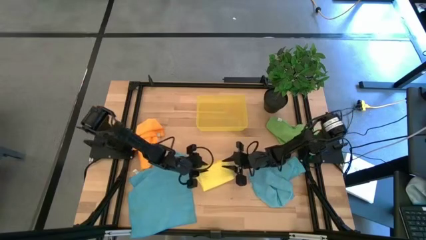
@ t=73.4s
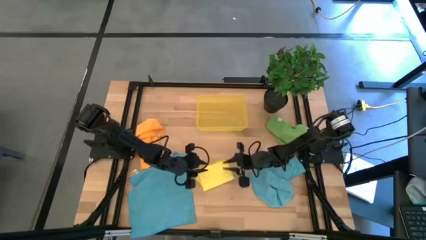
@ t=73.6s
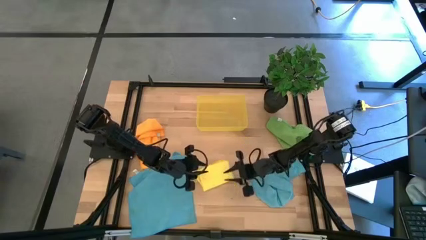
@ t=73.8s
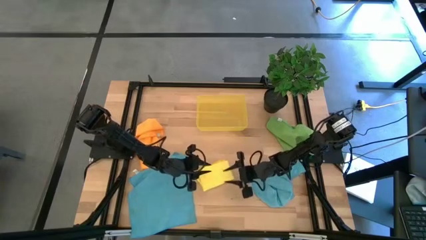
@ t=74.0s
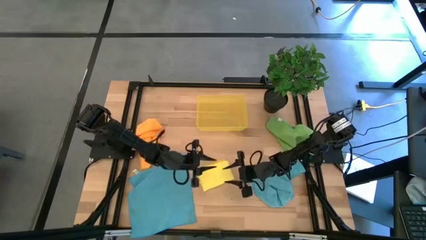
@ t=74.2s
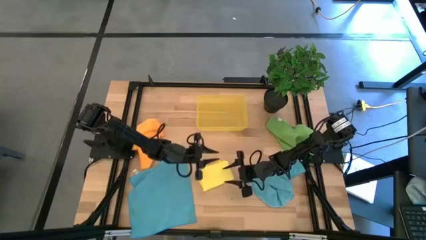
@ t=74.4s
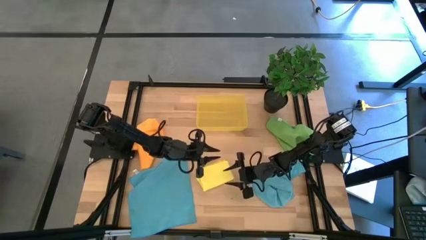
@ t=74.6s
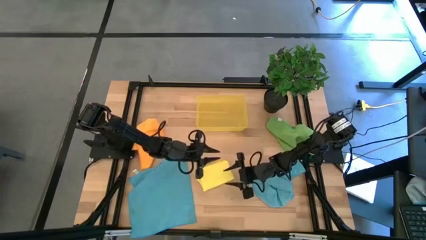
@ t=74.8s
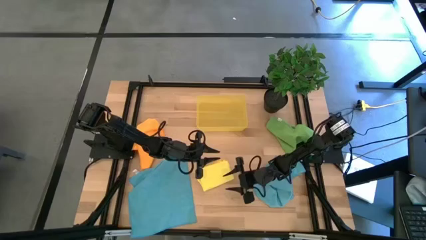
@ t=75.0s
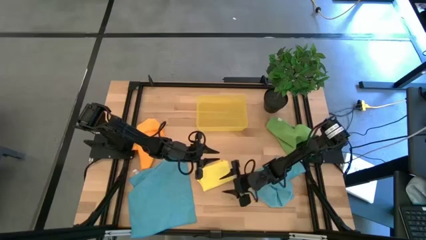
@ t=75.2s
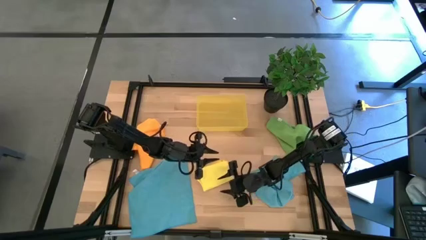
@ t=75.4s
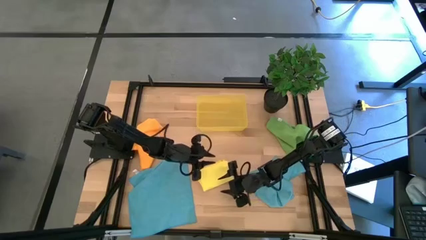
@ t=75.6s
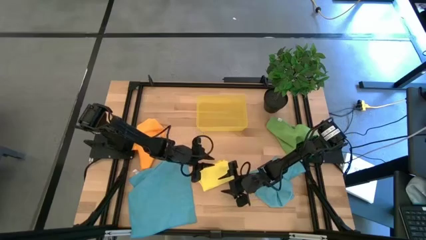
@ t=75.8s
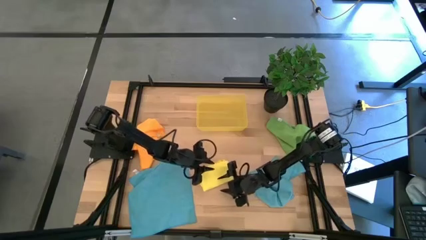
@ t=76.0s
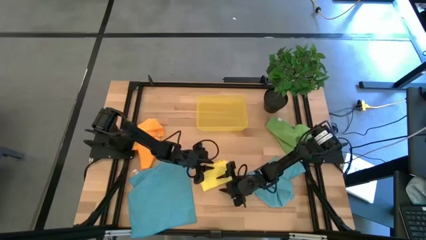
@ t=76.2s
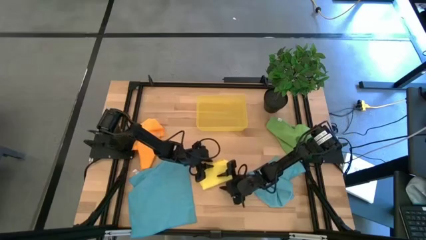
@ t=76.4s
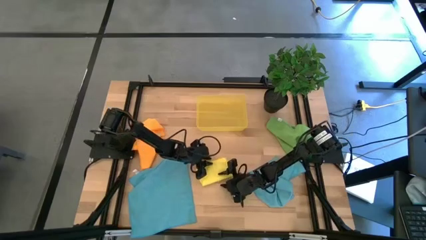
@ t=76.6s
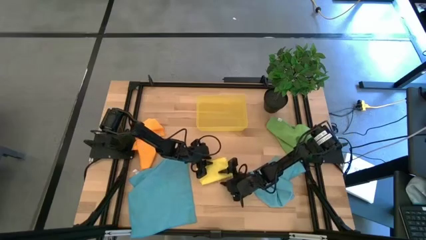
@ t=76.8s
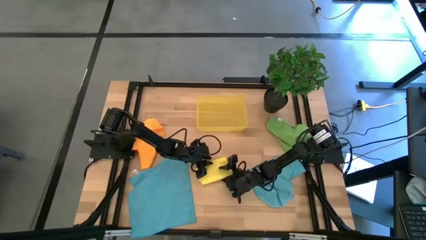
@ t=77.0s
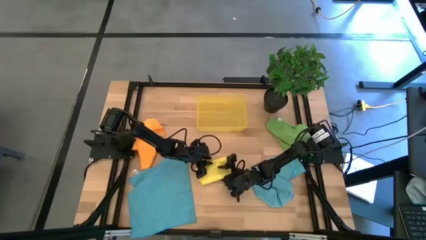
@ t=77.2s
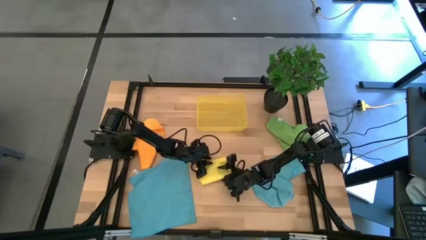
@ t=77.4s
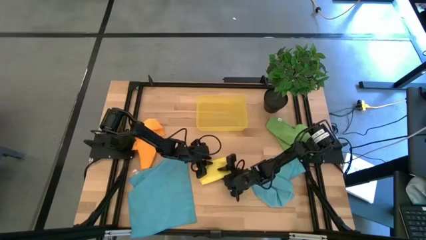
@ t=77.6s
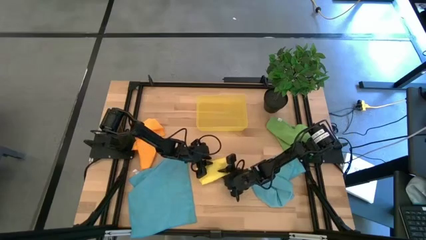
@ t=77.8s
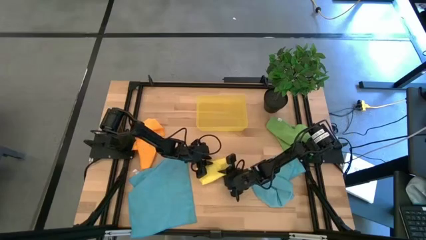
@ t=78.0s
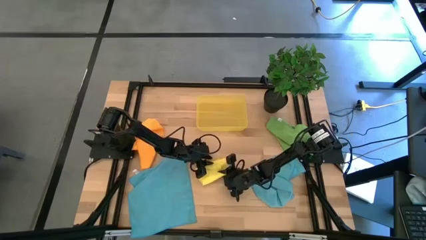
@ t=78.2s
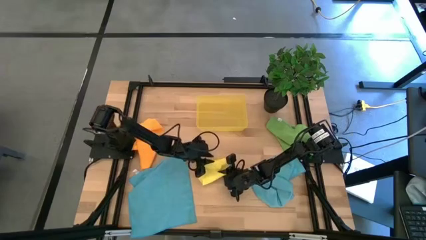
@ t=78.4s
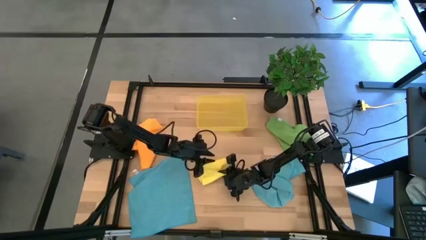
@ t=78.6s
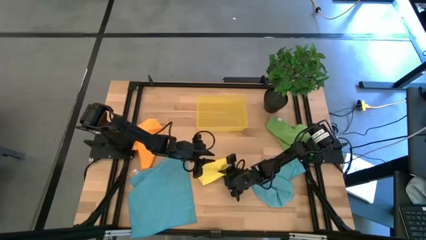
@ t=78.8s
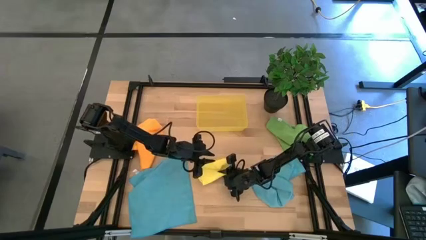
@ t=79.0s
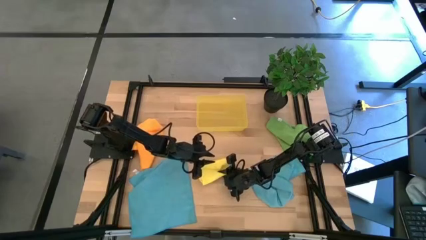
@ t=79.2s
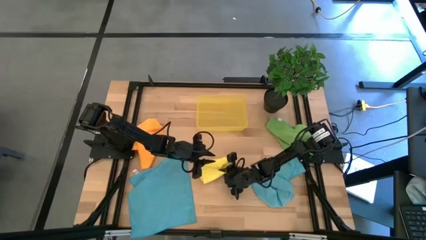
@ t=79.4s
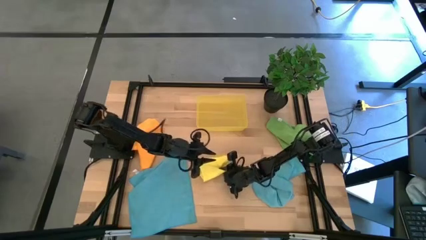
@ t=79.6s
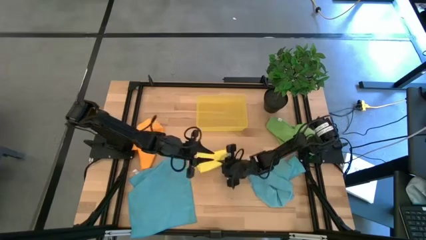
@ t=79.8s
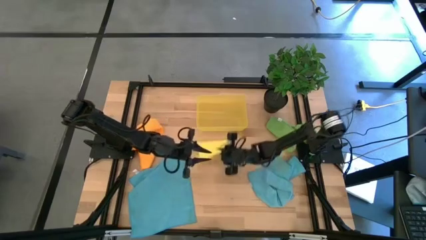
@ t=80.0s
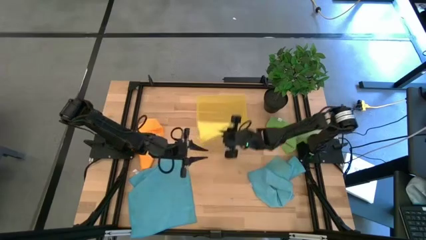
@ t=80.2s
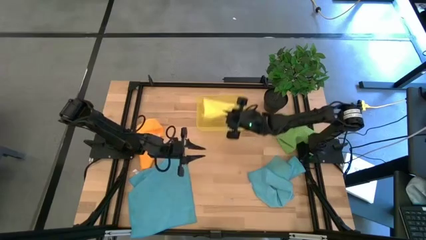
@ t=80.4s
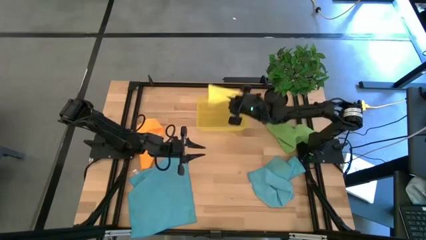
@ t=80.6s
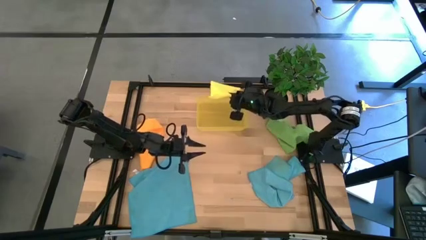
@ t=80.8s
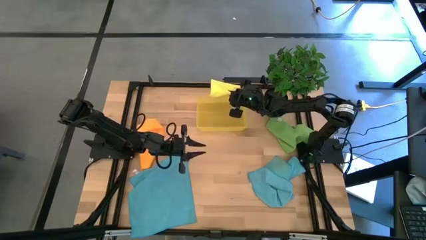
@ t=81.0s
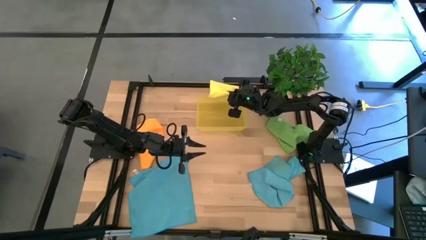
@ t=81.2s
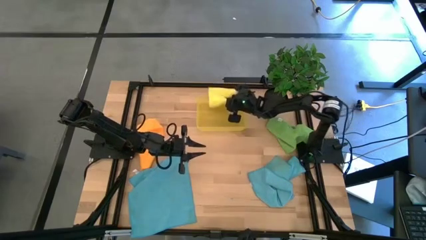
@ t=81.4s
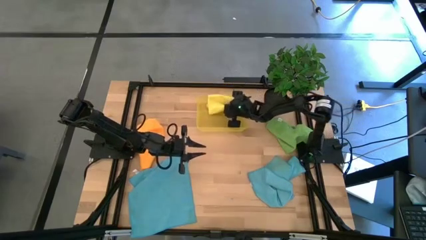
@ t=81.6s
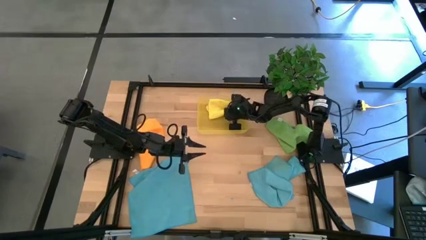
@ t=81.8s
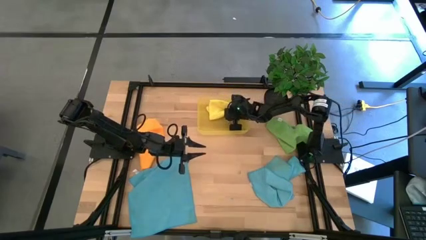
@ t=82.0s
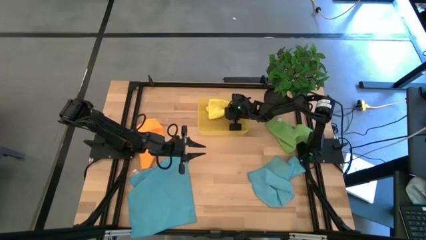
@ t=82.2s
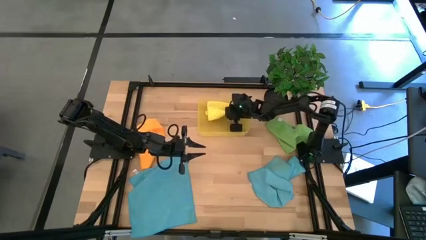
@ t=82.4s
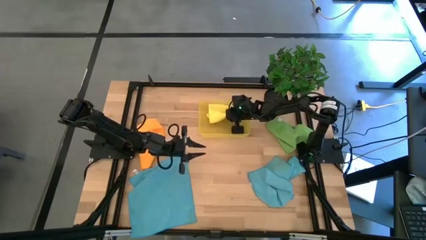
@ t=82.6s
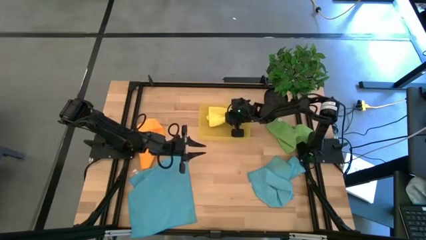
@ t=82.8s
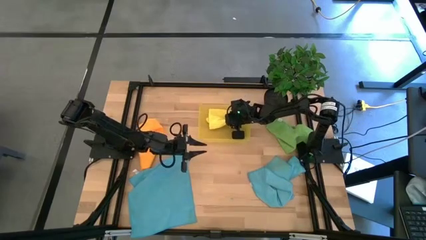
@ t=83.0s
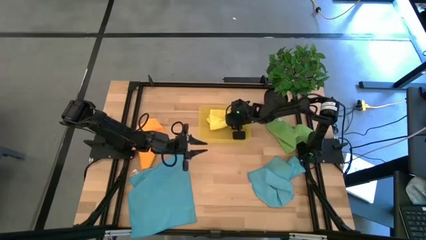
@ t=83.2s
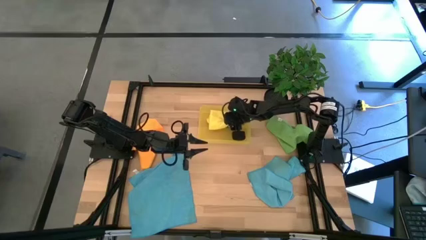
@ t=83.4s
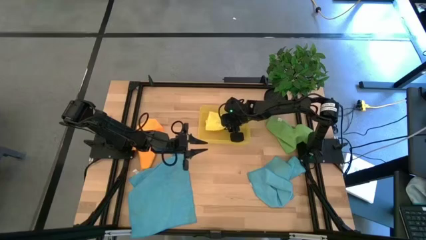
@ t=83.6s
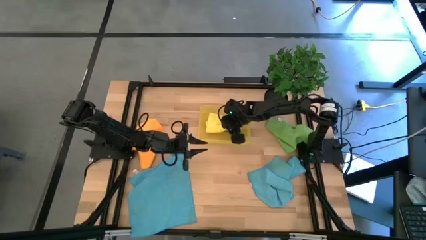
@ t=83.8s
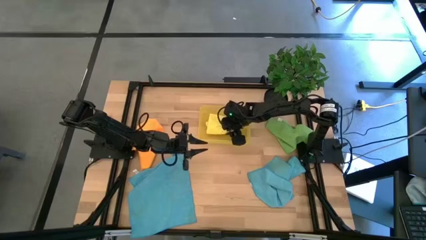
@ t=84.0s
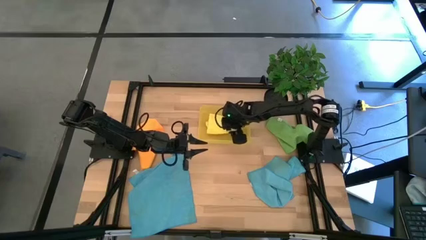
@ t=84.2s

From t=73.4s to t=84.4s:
Task: Fold microfiber towels
Put the folded yellow microfiber towel into the bin

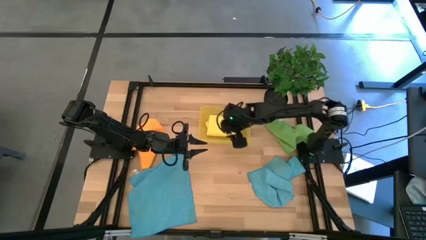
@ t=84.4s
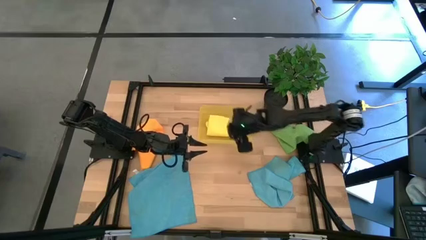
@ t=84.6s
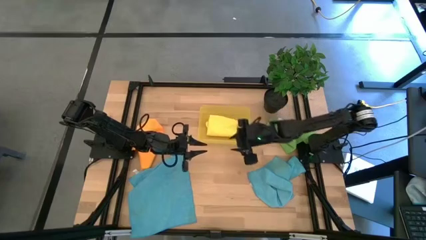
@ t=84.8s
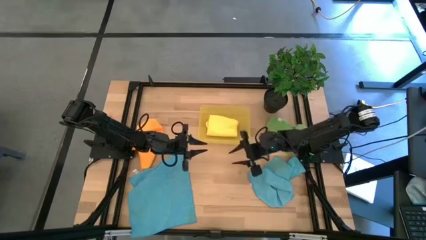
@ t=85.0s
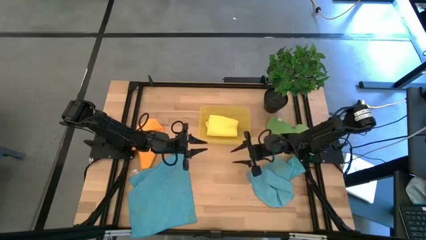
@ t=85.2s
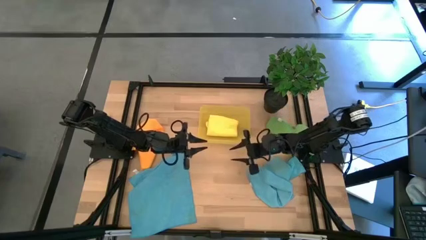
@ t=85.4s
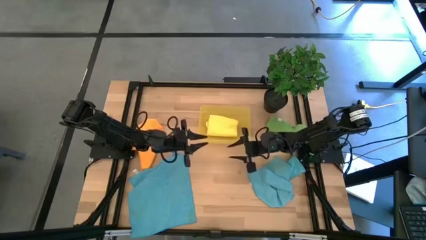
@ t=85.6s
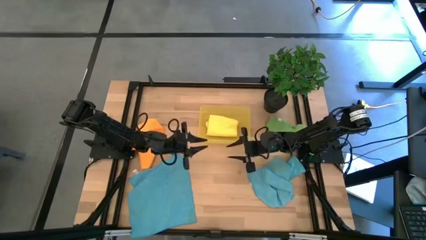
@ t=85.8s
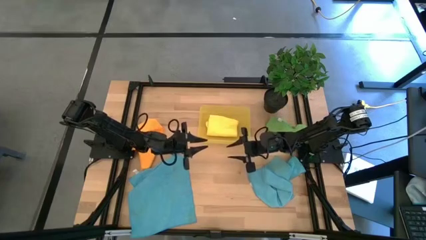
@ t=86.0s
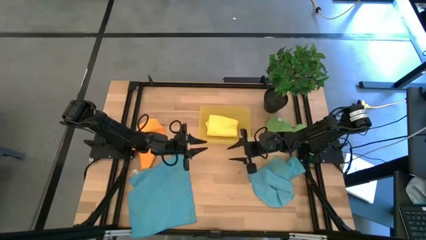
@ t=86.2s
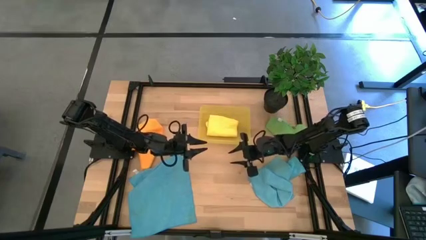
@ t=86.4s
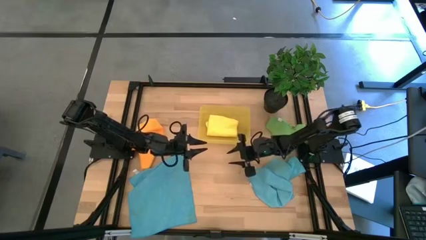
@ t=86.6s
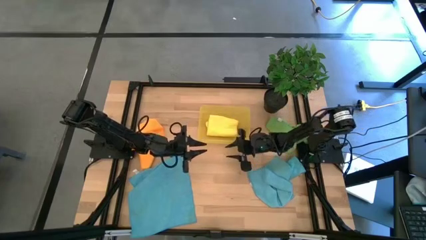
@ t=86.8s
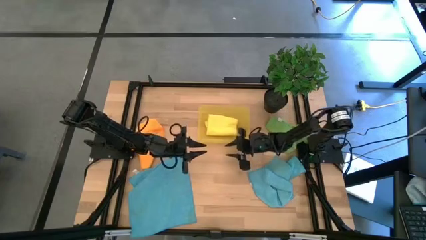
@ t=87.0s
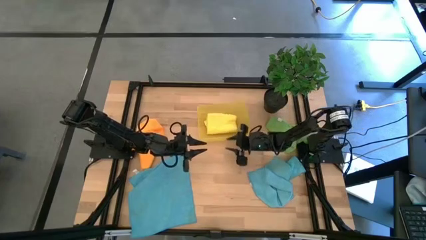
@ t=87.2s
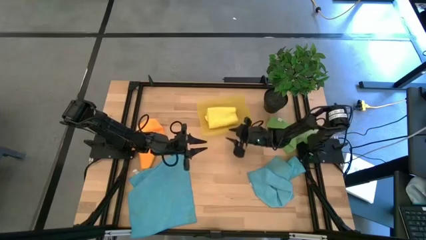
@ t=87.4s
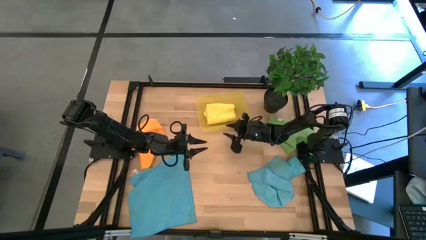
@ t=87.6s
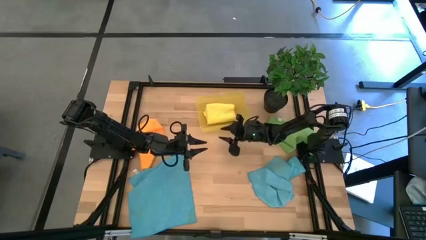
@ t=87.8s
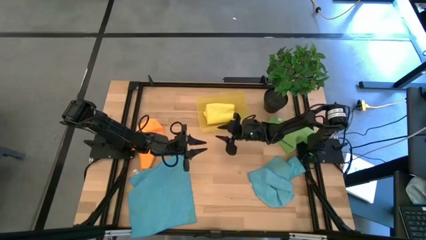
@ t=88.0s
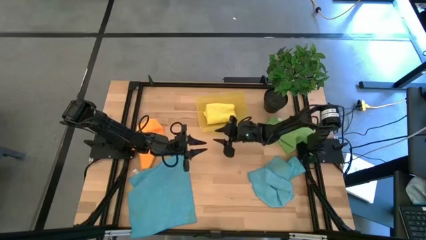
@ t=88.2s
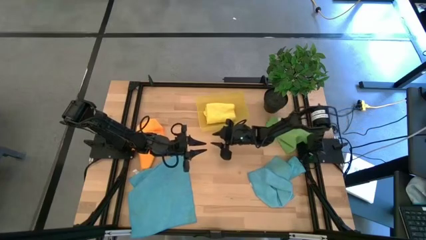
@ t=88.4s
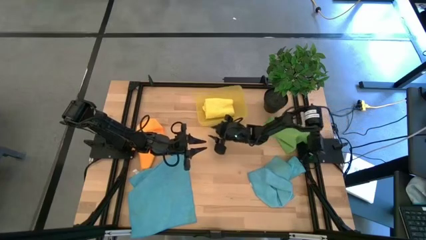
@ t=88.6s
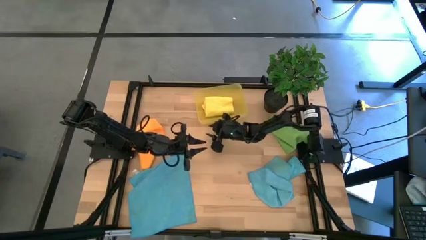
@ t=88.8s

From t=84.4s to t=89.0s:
Adjust the bin on the table
